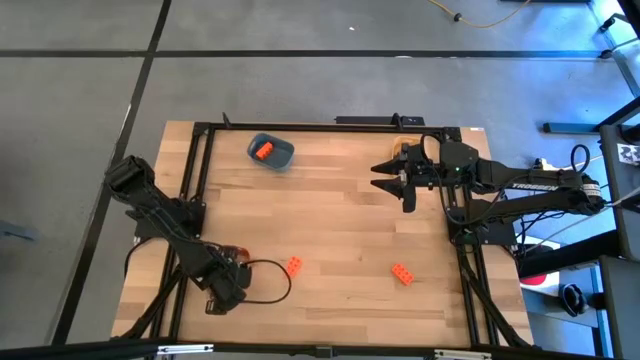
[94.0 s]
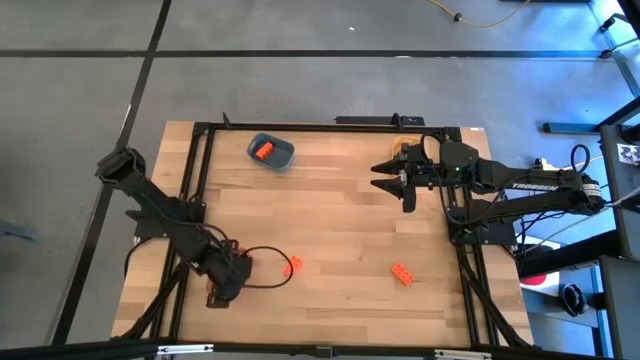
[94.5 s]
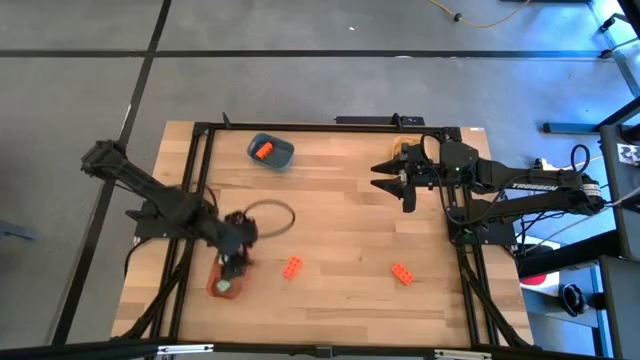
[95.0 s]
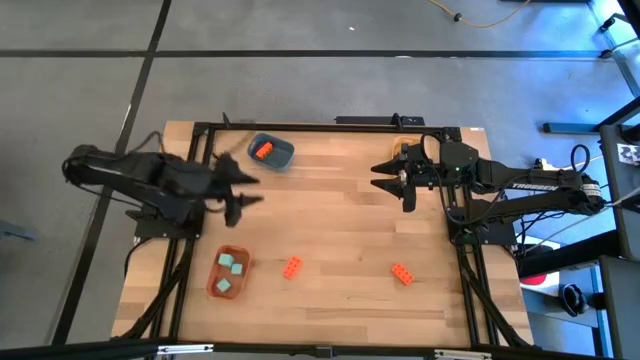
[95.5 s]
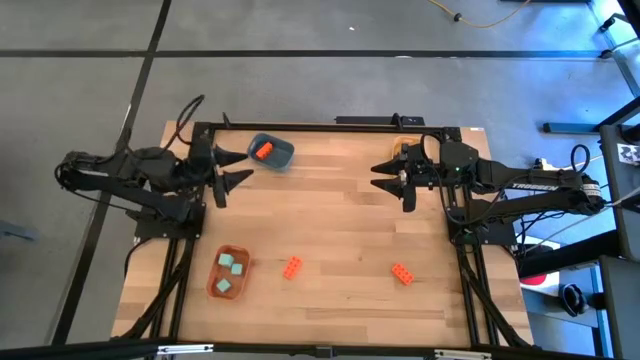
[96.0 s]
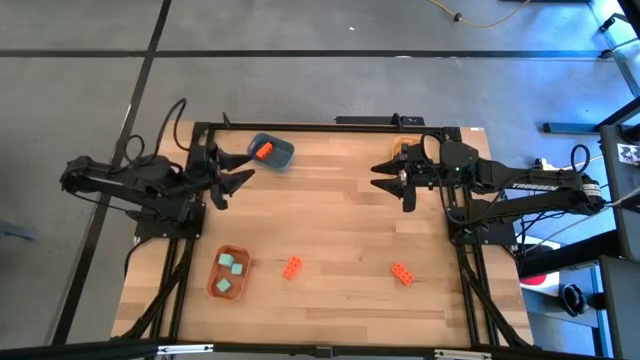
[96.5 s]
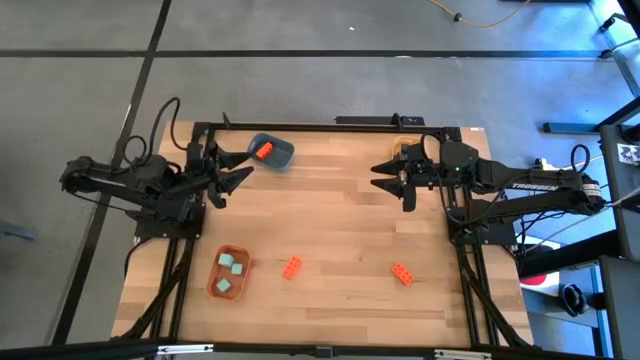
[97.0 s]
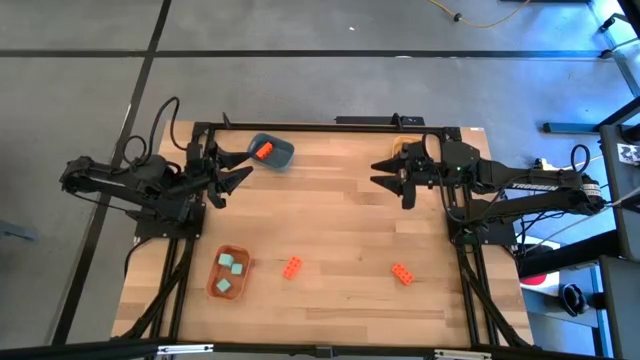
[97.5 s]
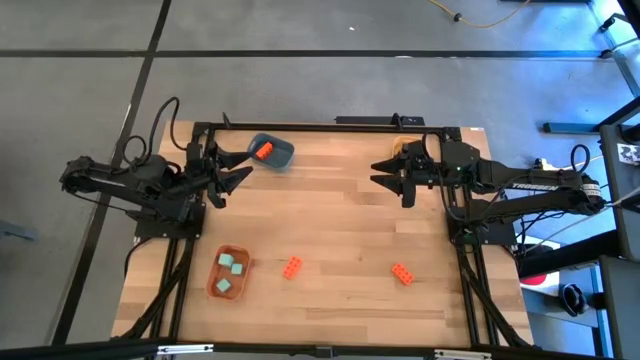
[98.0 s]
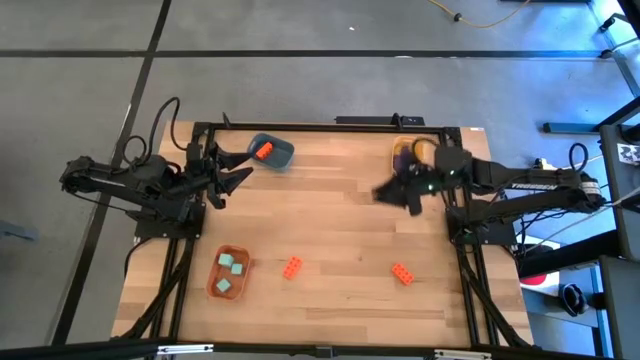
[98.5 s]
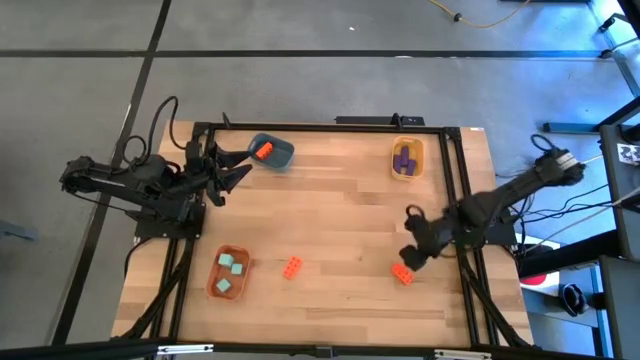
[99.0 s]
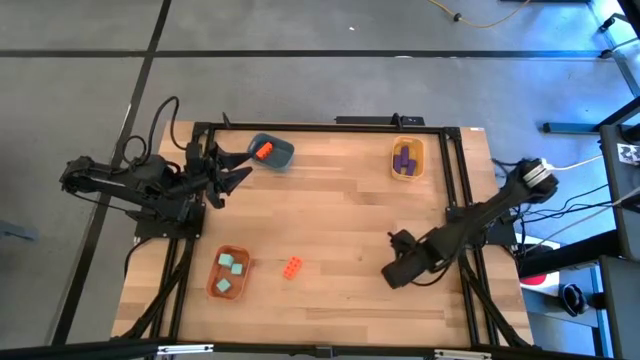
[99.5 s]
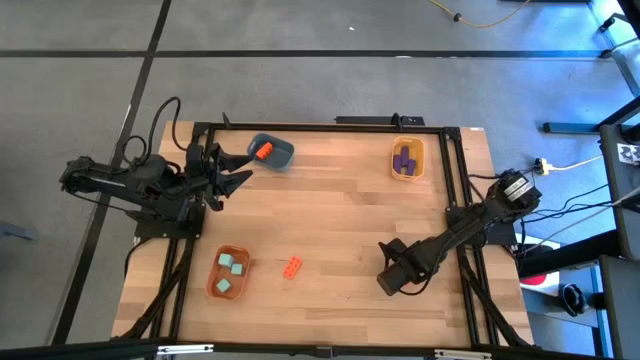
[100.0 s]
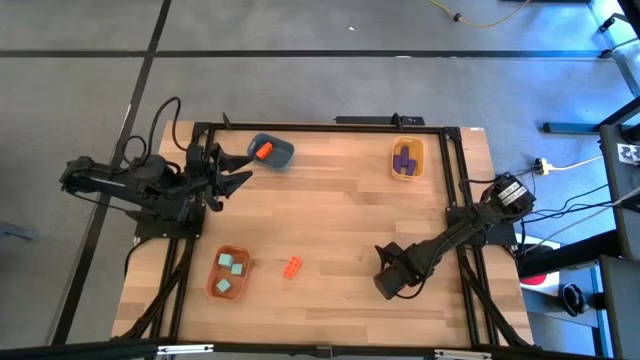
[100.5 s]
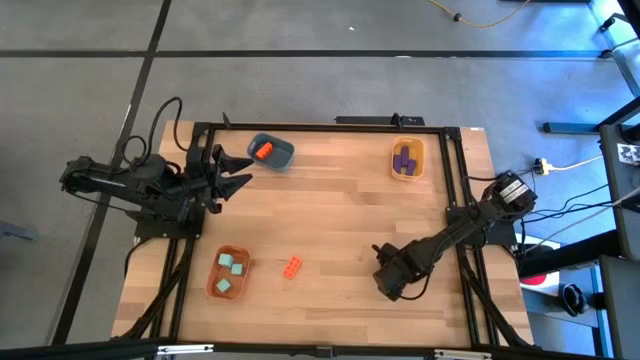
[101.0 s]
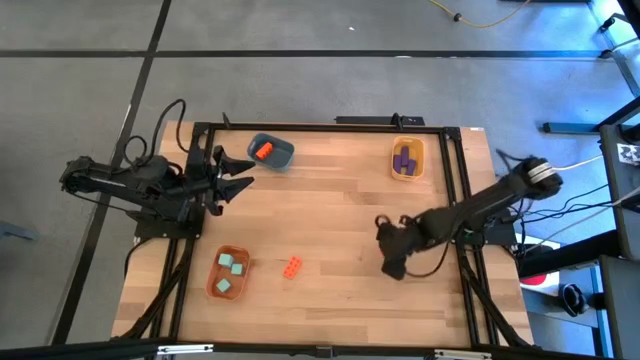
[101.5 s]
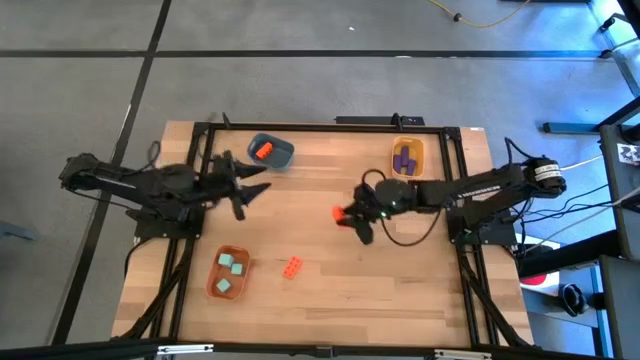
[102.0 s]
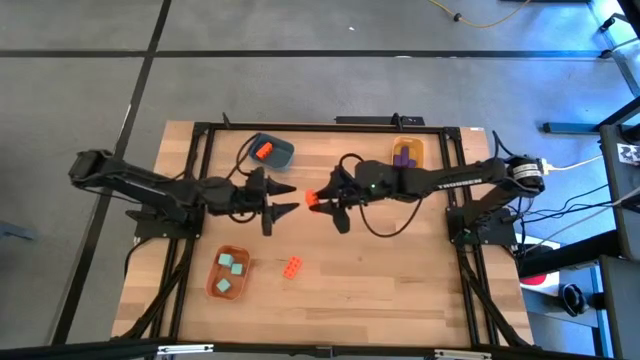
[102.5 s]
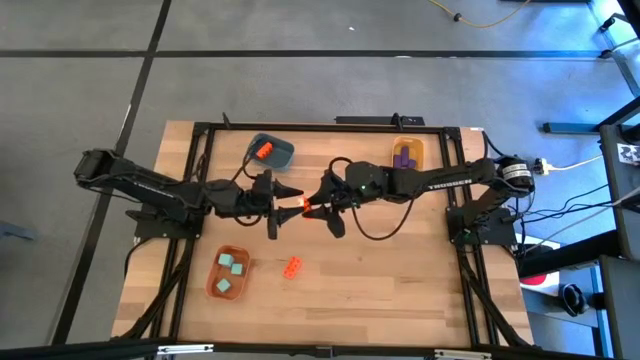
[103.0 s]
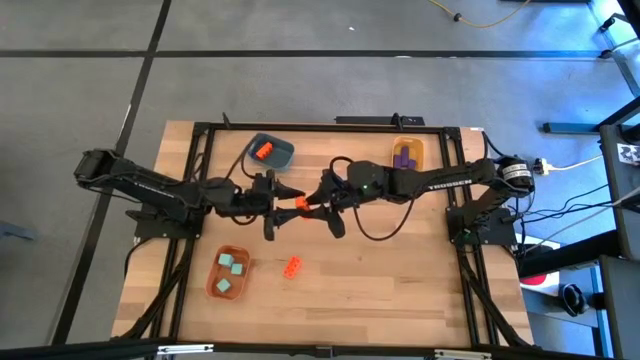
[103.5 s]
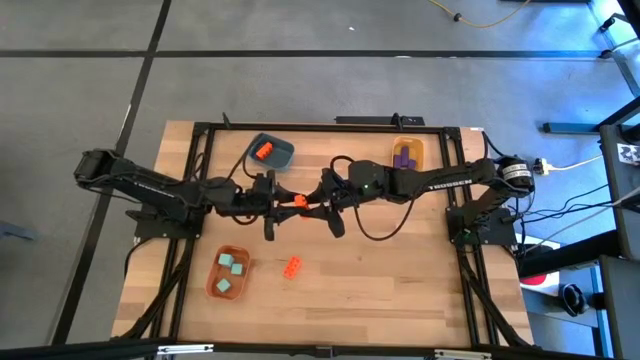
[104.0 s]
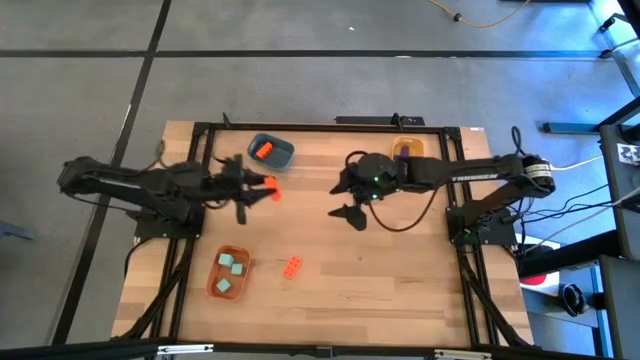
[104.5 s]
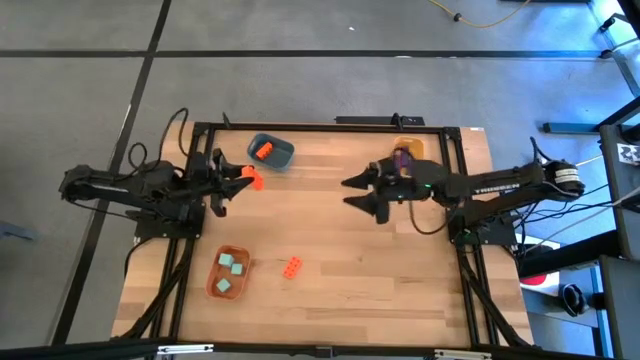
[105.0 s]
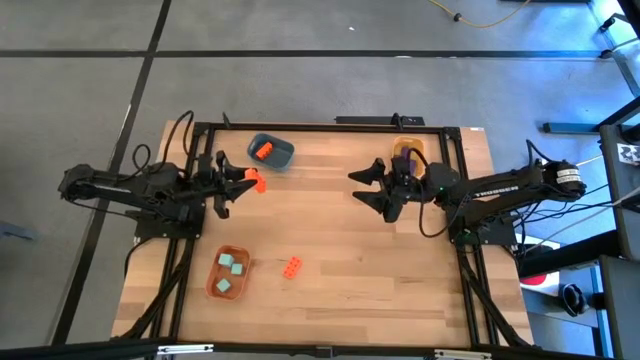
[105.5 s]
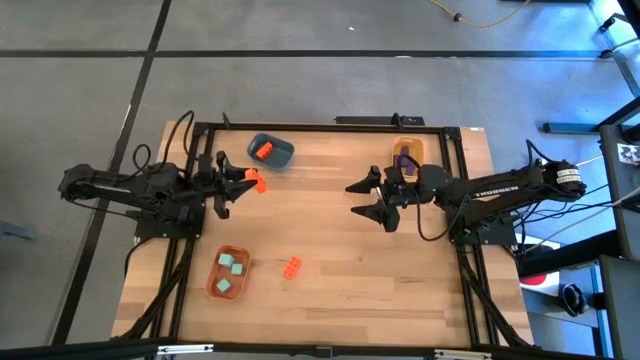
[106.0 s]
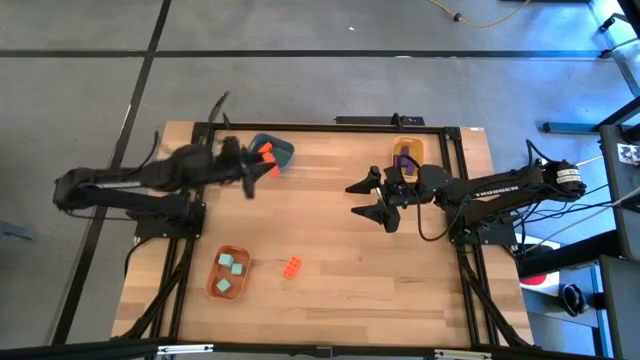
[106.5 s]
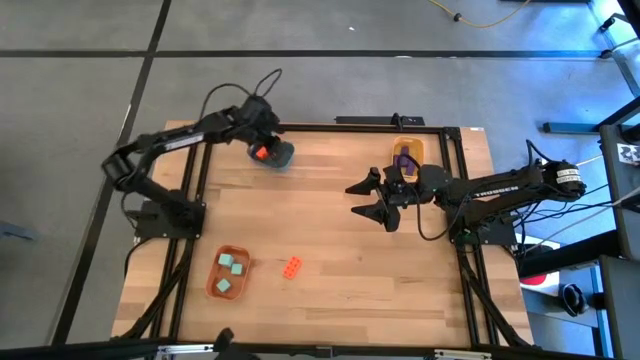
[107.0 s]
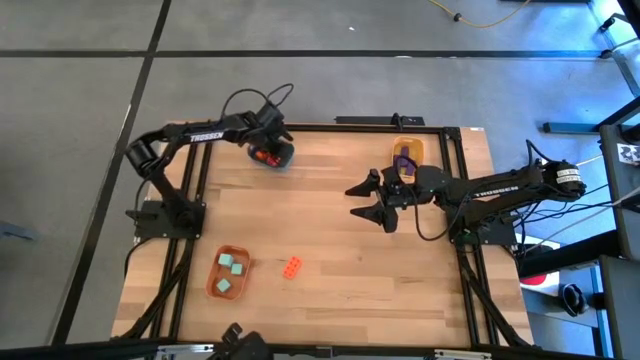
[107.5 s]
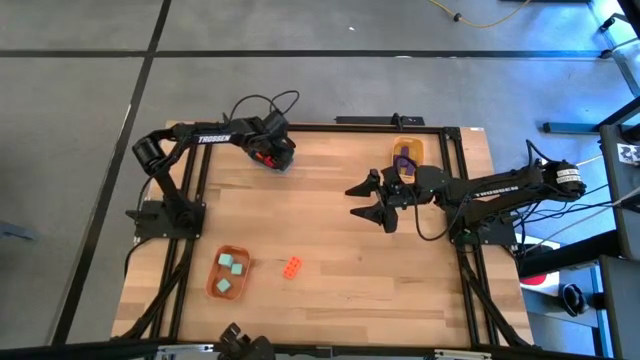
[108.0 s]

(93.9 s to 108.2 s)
Task: Sort & place blocks by color
Put the right orange game piece into the blue bin

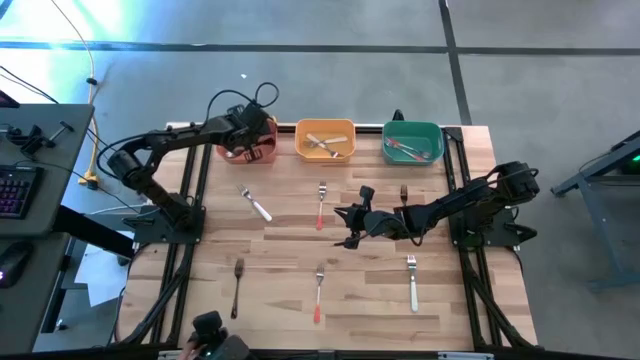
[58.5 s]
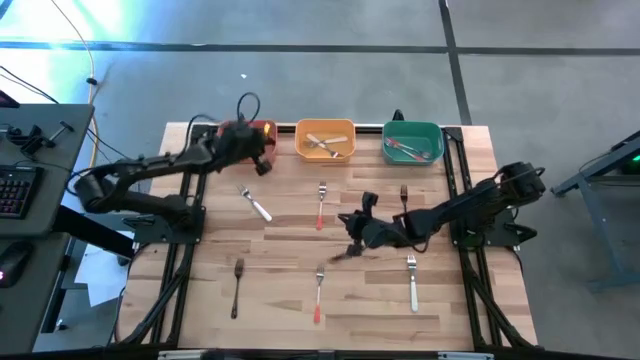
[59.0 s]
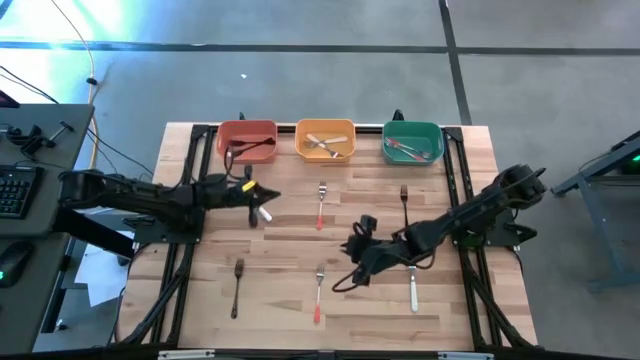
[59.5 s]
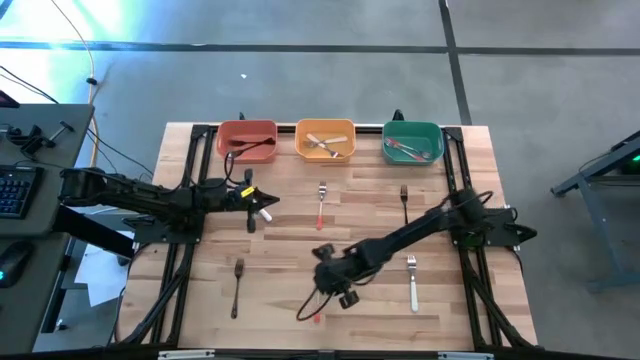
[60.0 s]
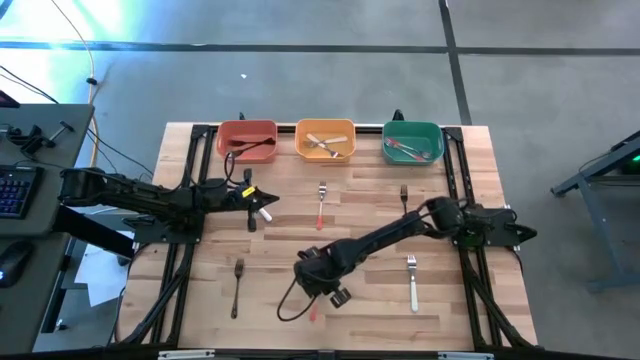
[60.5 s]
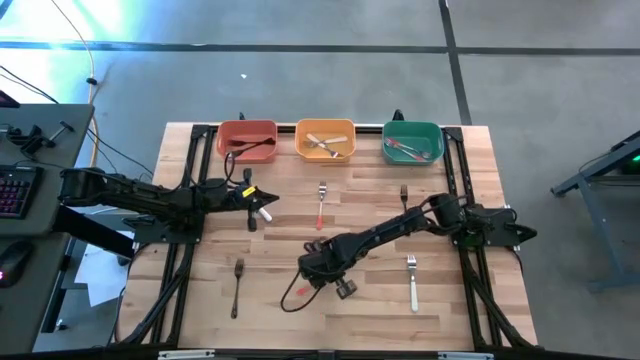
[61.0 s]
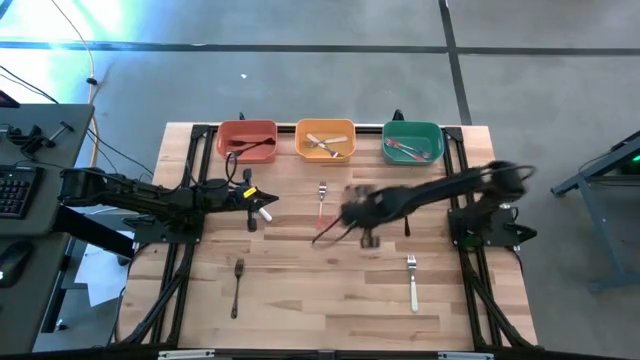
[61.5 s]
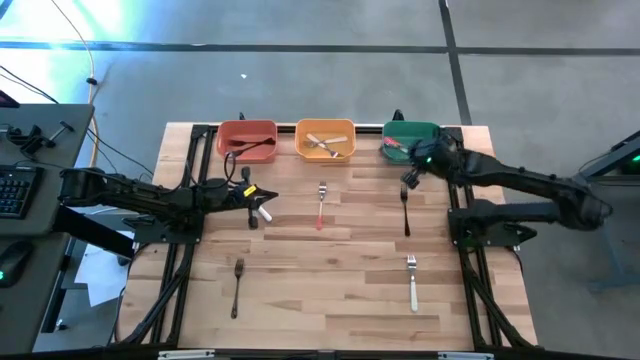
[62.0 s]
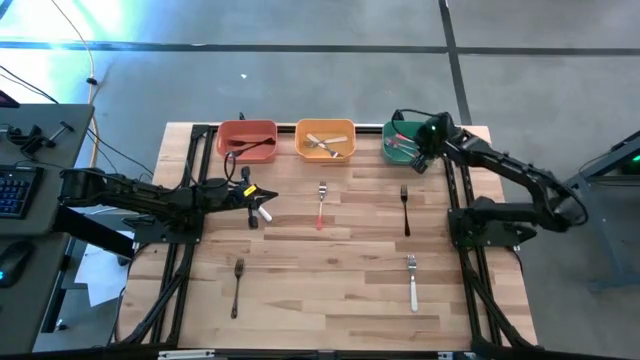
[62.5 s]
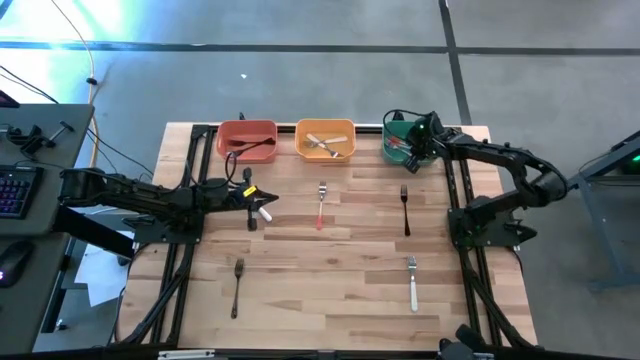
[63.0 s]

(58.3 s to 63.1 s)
Task: Sort silverware by color (type)
Put the bottom orange fork into the green bin

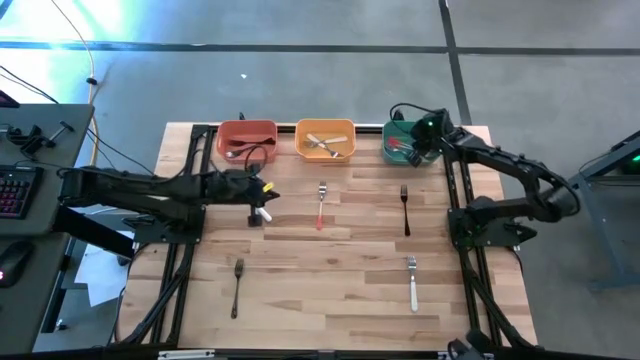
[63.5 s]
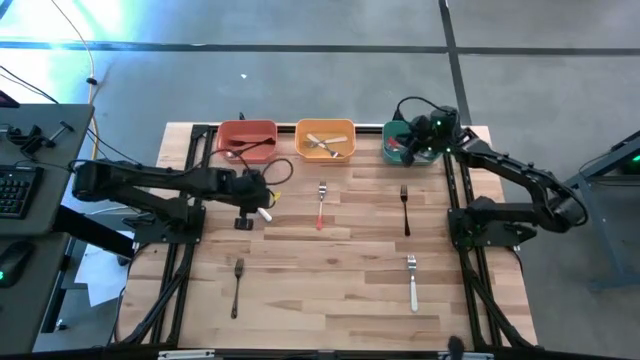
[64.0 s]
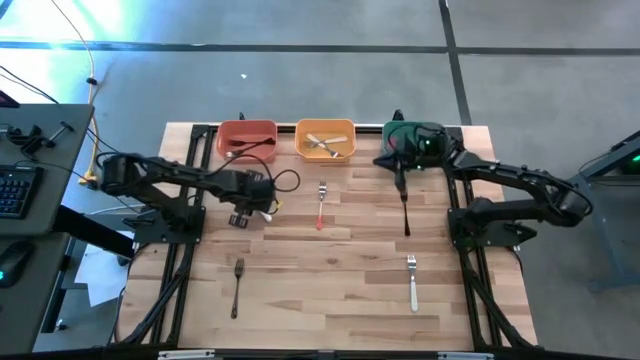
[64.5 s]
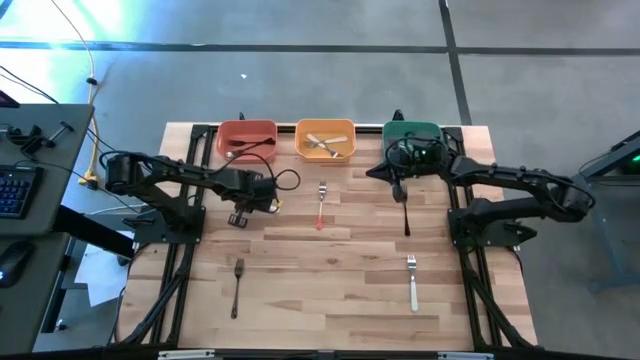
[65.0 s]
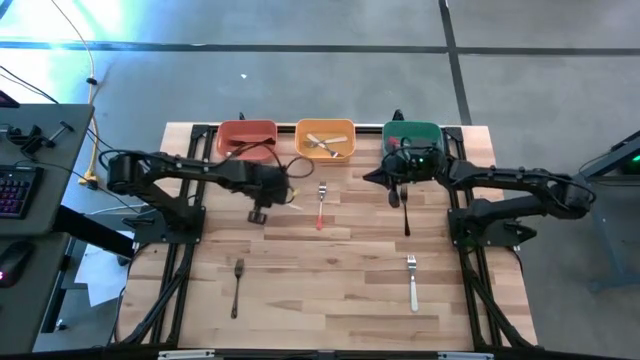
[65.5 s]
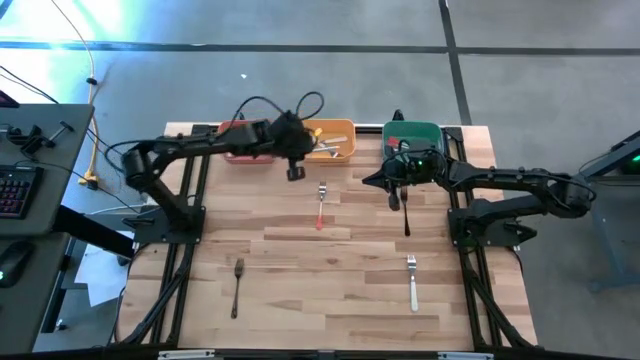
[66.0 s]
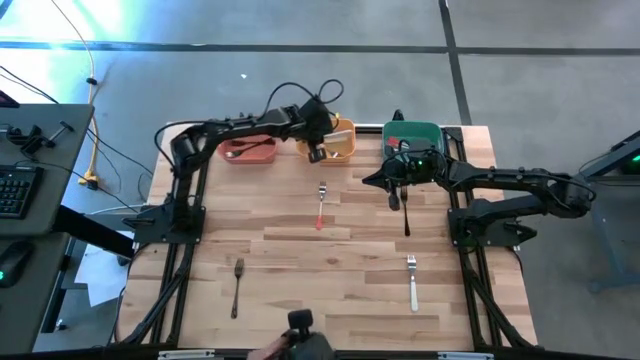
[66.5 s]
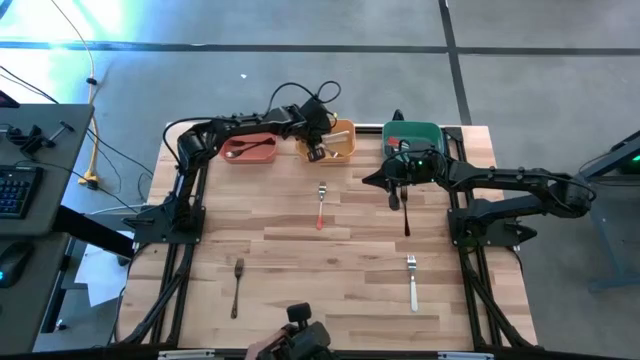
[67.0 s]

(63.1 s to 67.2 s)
Put the left white fork into the yellow bin
